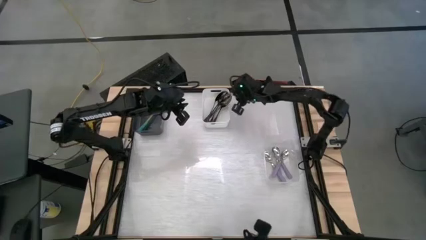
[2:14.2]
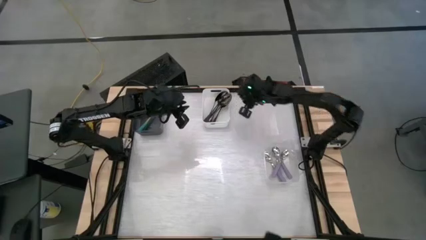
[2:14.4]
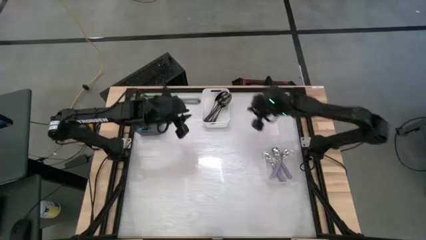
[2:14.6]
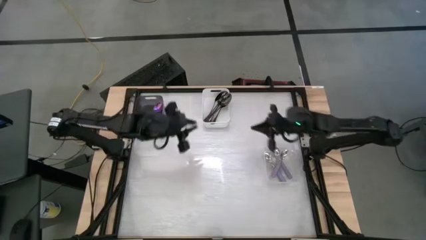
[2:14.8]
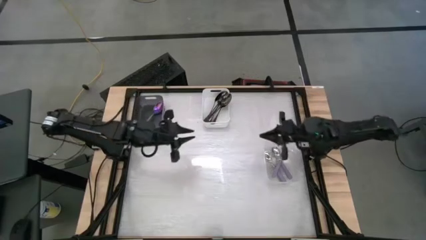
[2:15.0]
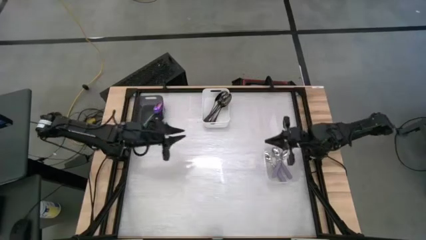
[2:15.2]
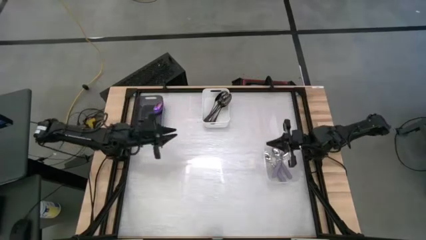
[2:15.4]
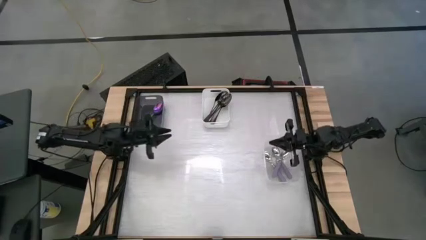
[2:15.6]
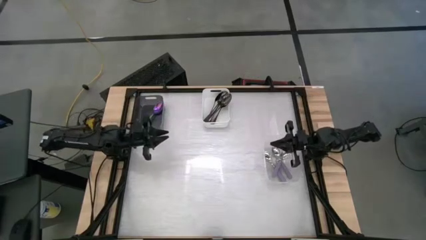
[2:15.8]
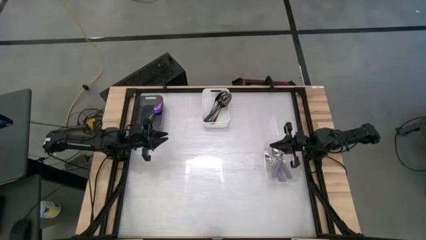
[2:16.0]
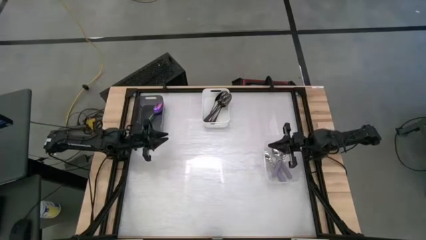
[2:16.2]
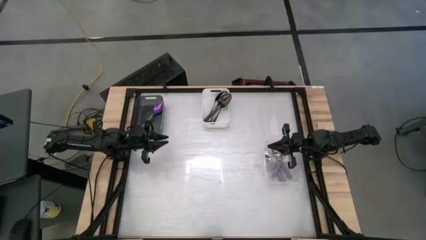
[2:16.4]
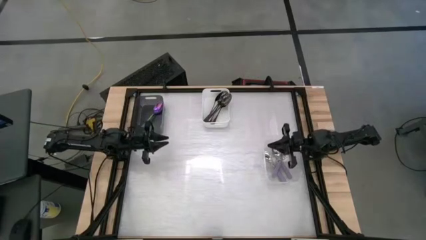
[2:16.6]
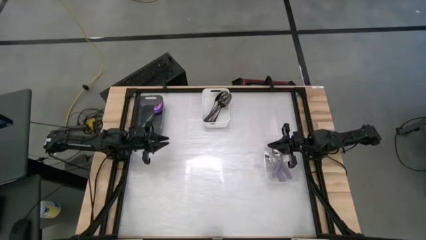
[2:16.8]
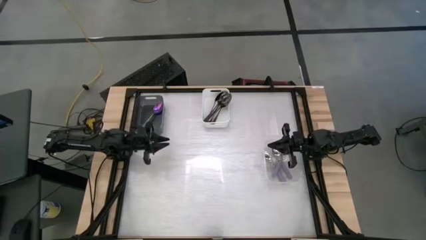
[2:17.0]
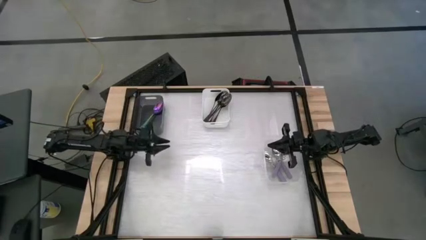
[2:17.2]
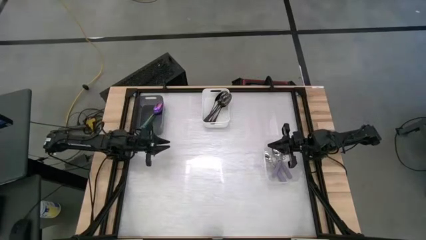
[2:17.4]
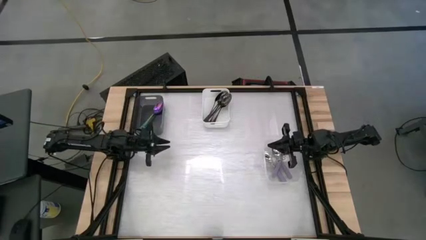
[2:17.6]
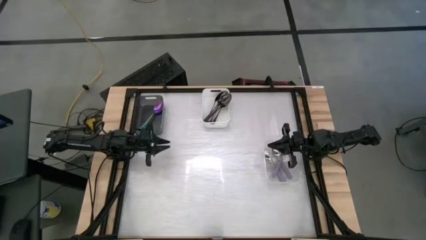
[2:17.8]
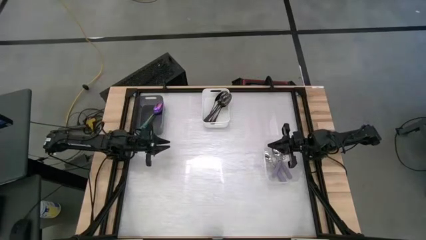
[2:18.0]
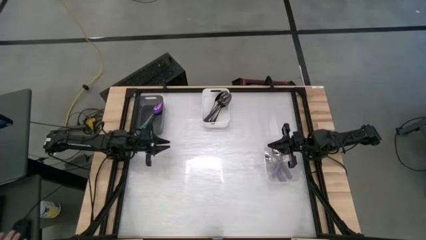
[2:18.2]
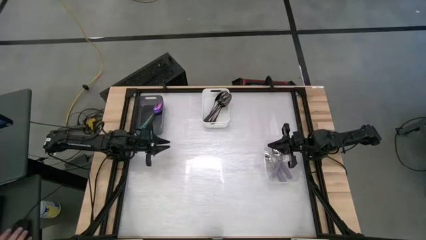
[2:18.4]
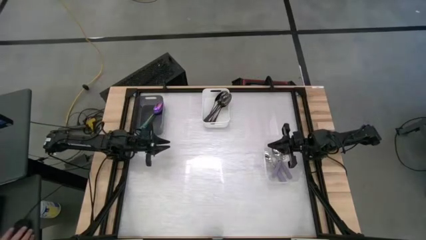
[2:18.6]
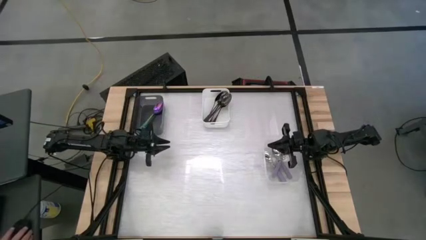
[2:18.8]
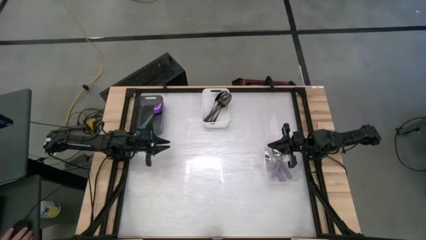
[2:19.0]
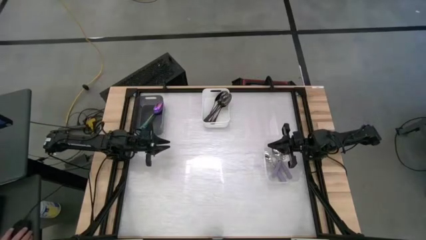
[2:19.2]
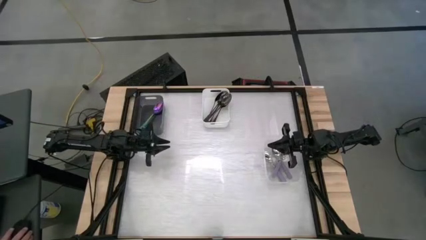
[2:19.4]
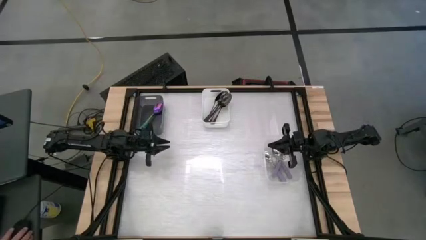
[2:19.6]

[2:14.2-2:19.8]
Task: Sort silverware by color (type)
Return to Home Position

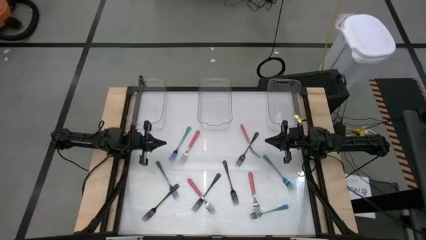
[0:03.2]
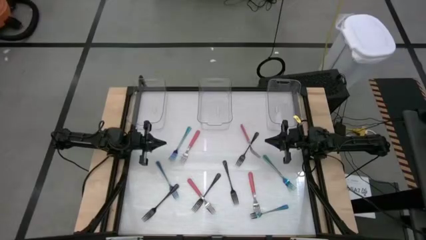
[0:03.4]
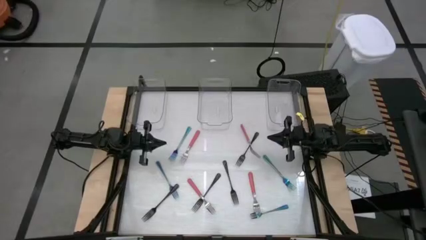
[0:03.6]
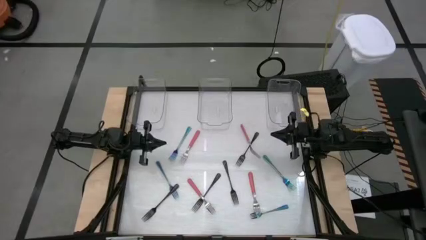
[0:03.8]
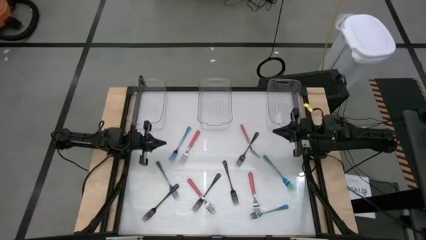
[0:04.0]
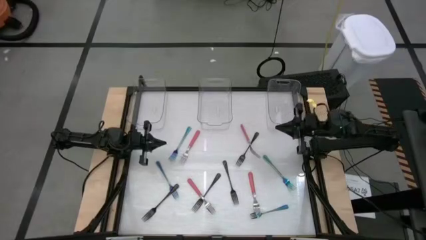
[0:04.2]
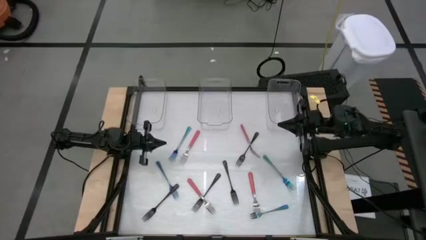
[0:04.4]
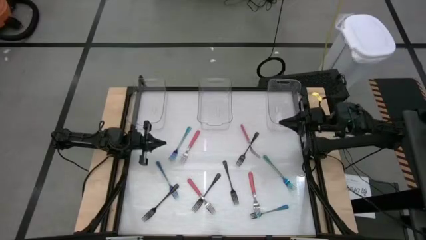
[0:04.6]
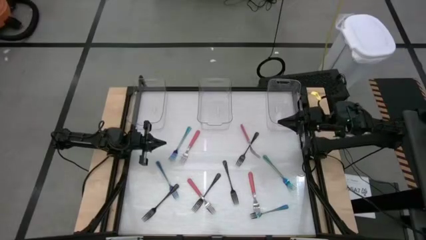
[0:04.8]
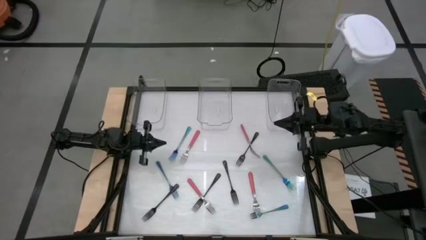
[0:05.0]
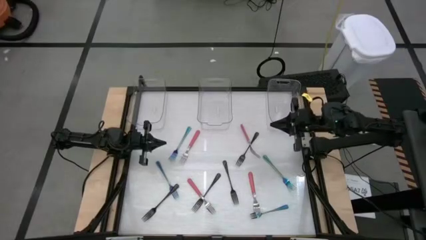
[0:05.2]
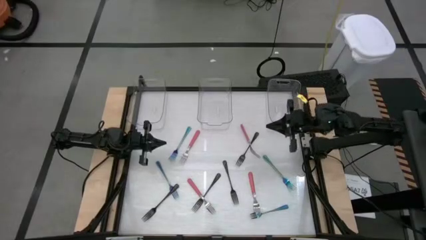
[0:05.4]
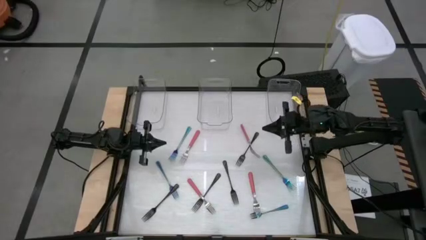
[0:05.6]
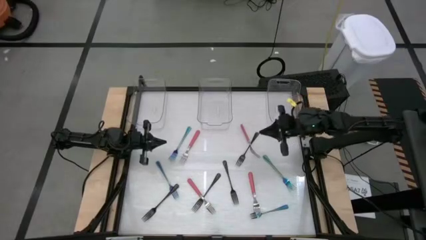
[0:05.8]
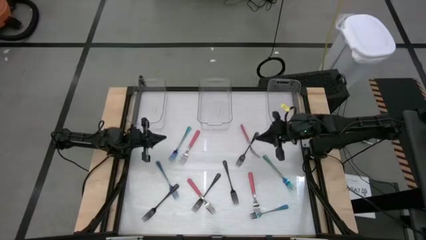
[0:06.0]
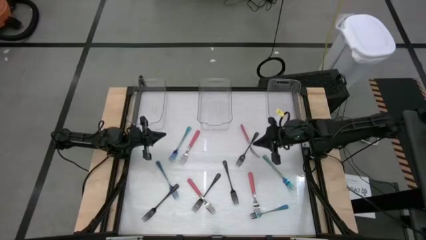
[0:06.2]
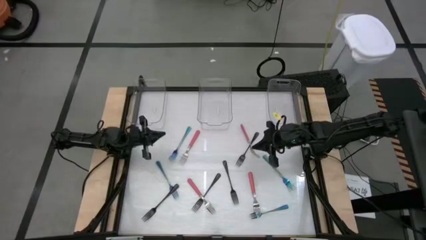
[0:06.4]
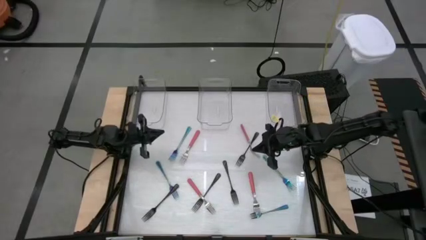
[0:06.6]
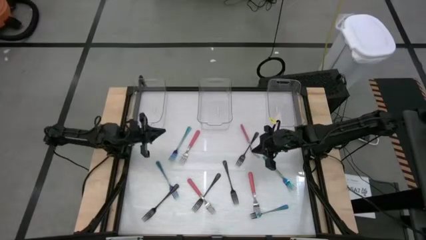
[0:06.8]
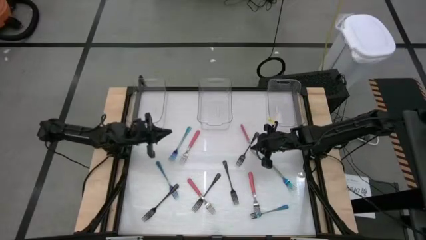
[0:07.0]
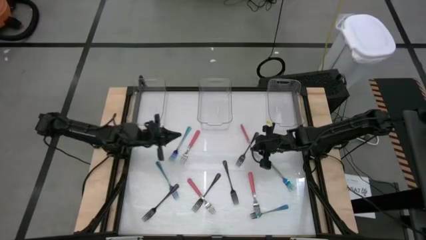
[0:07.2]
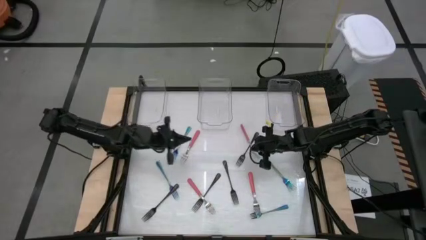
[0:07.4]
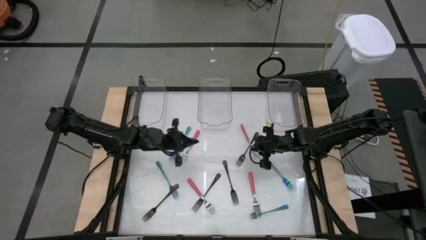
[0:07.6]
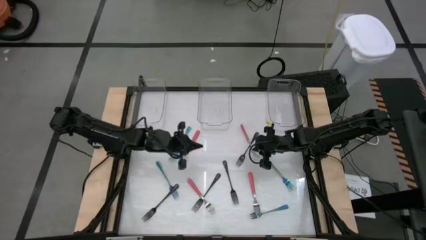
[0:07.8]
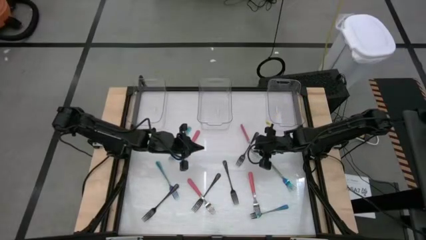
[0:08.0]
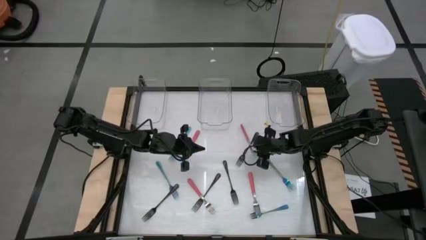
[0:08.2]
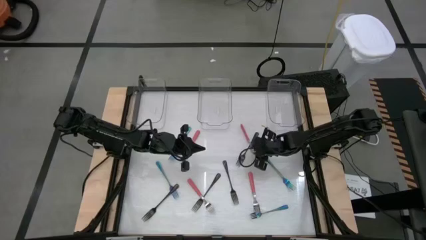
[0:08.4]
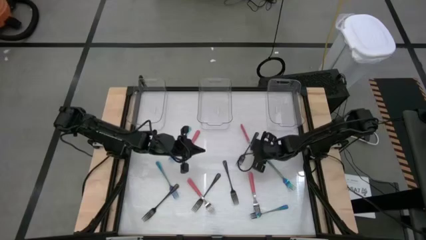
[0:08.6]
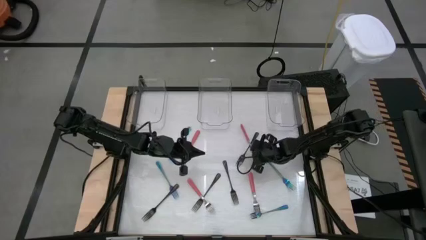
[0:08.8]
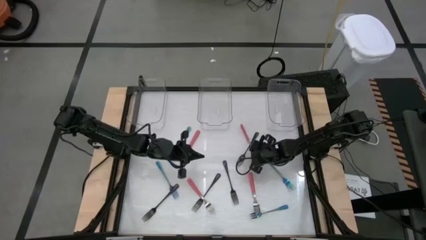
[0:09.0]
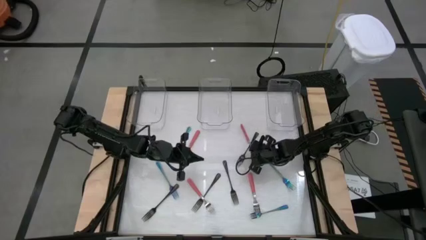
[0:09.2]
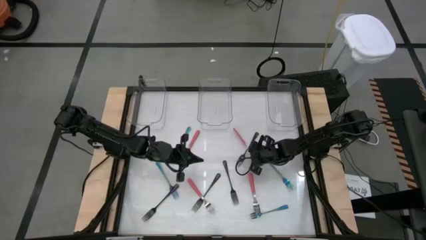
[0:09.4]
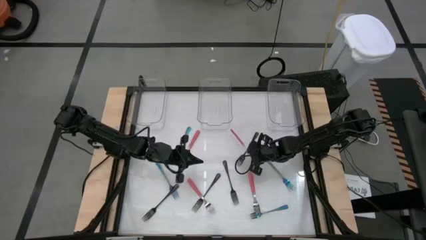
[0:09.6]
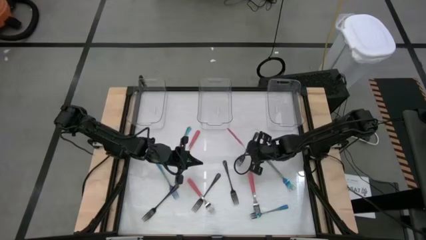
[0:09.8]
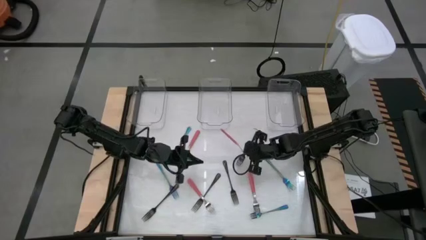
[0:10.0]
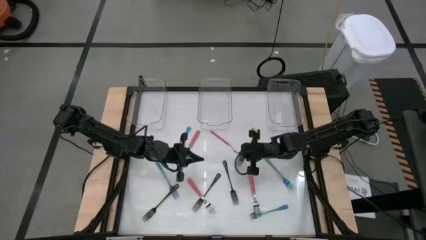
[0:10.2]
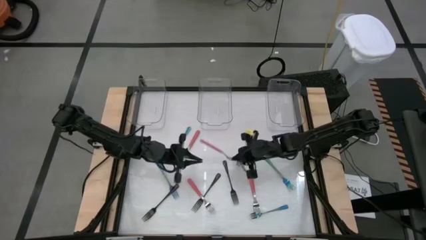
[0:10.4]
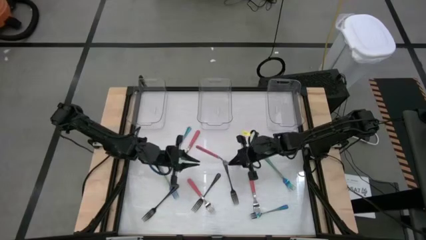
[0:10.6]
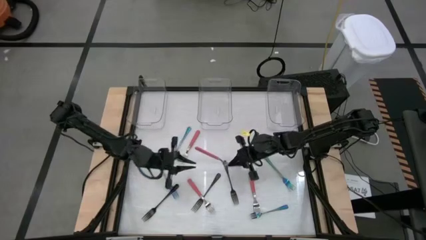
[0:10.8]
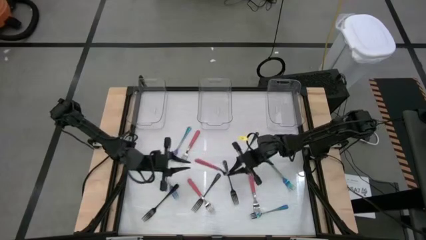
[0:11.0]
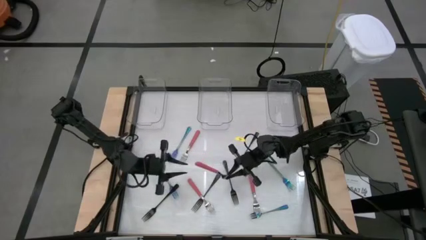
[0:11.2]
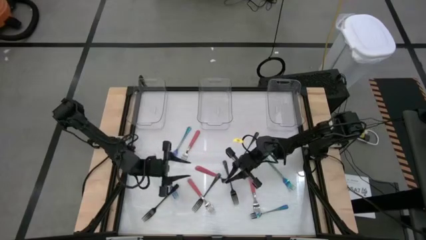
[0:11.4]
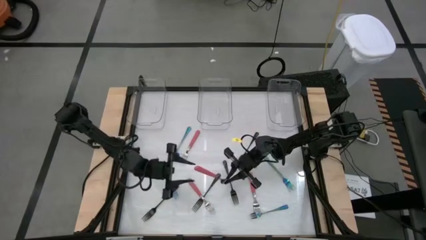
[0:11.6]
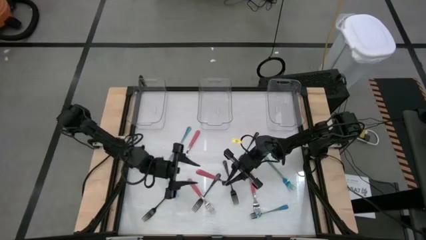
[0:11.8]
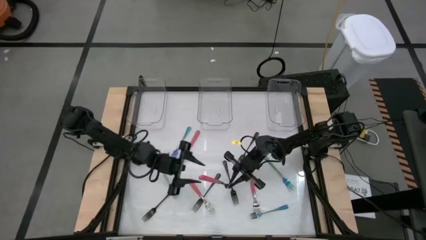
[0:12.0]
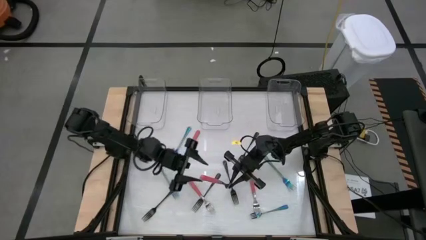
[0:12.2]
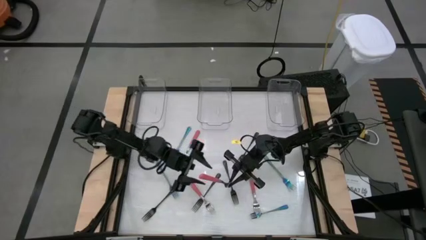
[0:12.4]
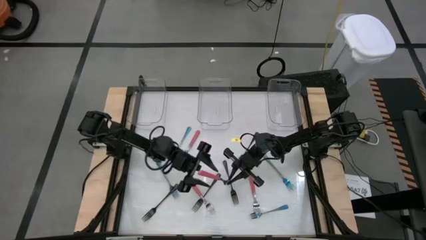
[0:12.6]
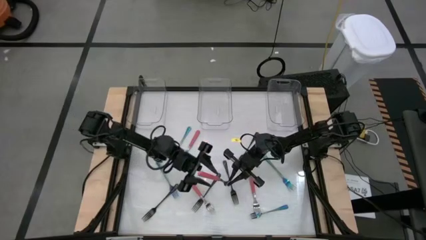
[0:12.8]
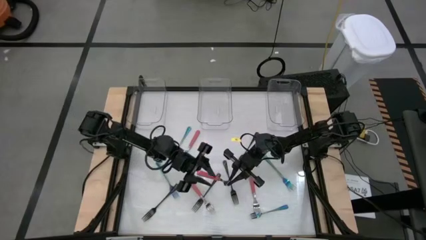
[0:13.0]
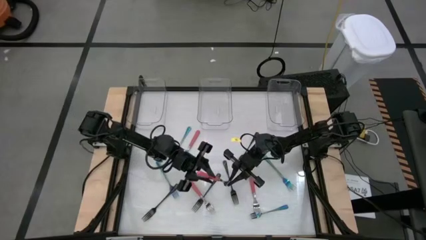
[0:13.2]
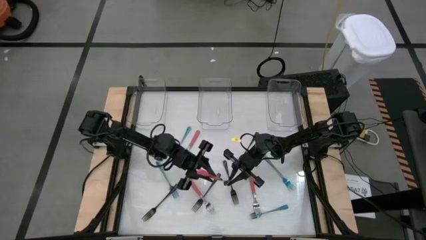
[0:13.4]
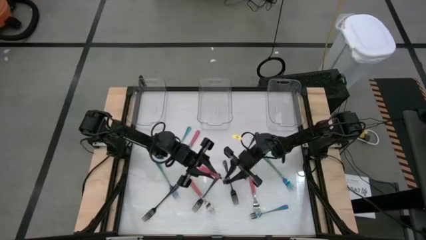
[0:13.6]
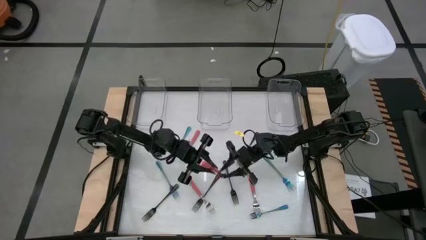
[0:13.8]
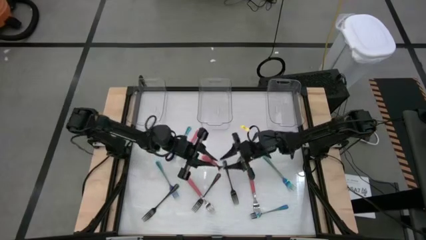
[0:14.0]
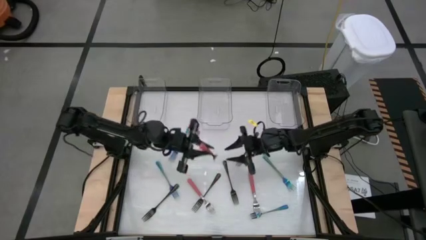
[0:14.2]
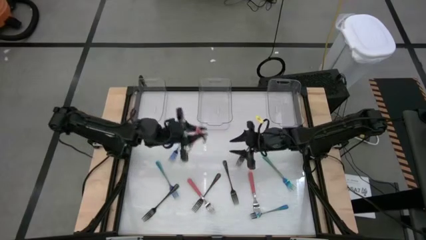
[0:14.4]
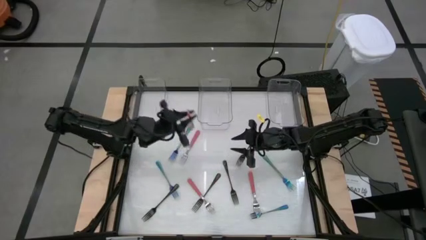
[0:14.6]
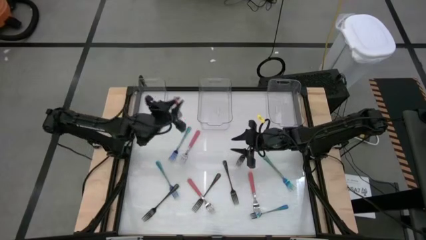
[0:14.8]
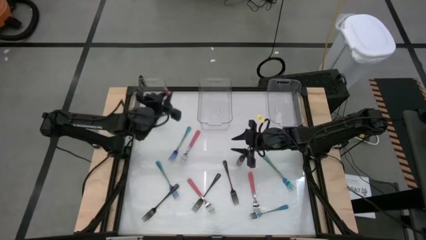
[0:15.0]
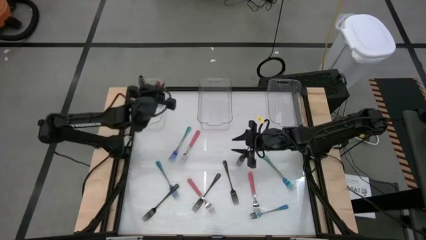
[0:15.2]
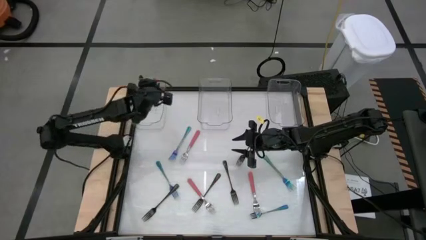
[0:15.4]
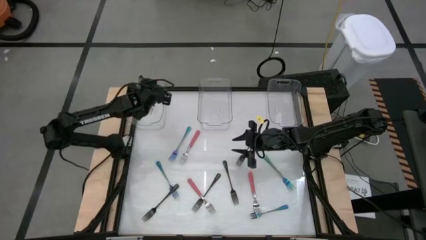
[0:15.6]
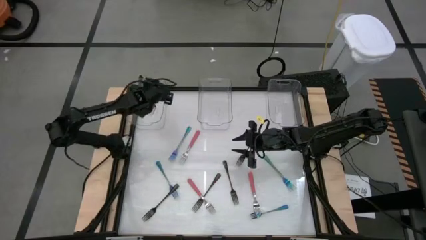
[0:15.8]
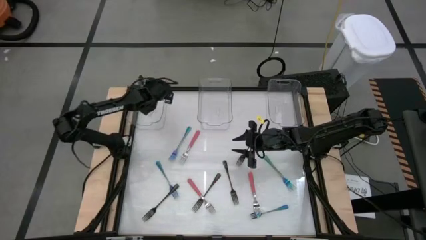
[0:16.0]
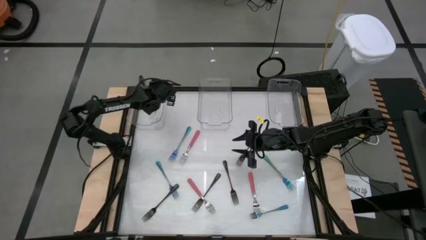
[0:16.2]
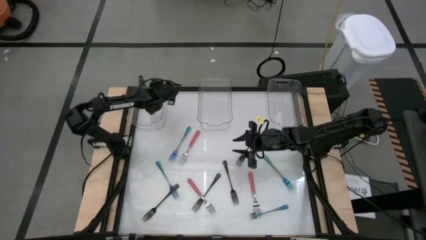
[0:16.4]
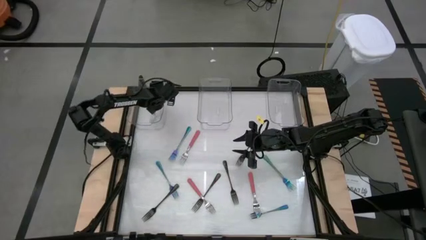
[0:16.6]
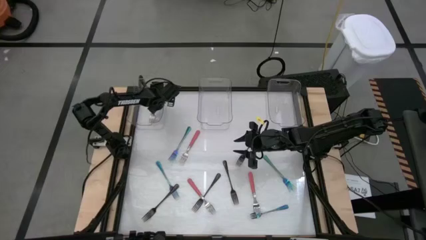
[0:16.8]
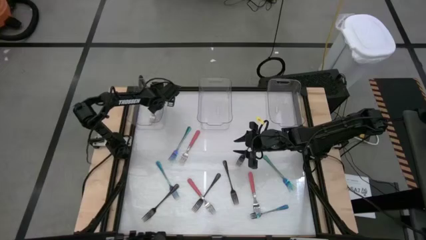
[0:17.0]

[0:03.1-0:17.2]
Task: Sort silverware by color (type)
Put the pink fork into the left transparent bin
